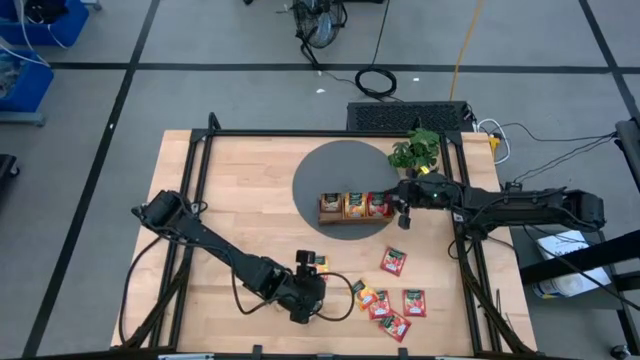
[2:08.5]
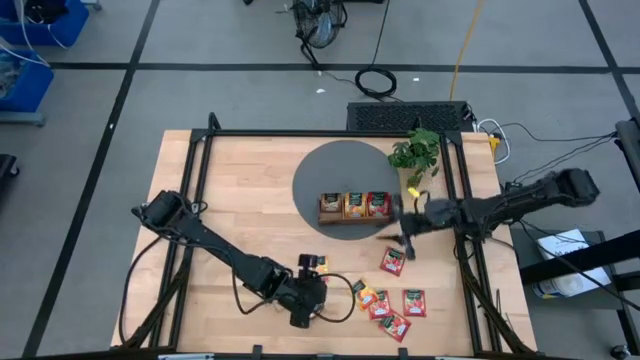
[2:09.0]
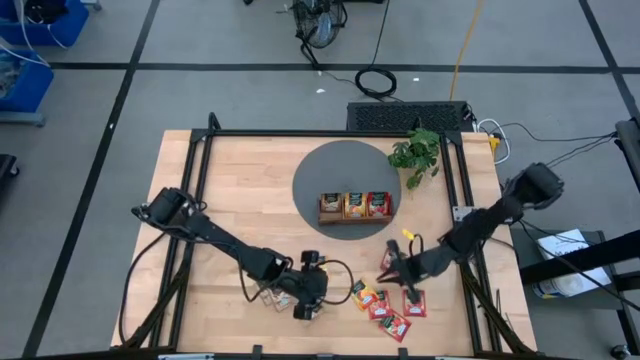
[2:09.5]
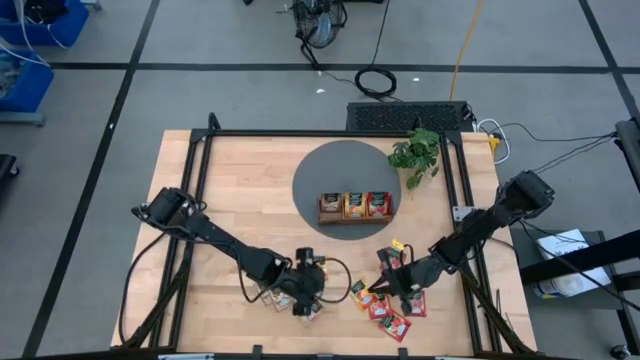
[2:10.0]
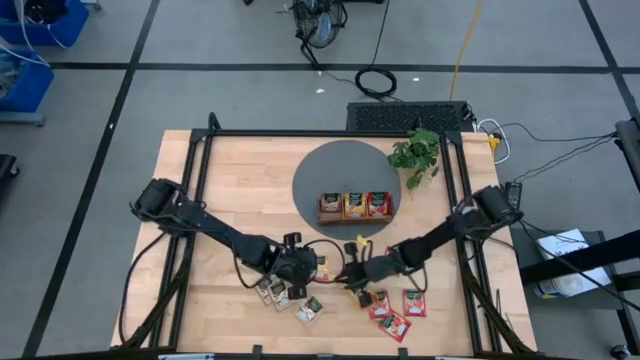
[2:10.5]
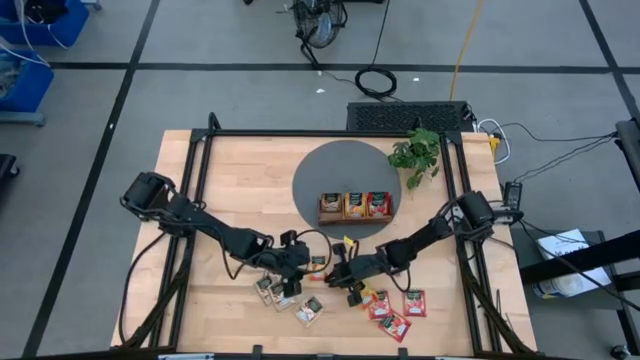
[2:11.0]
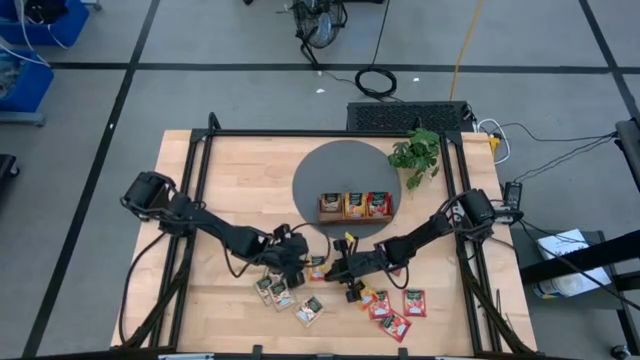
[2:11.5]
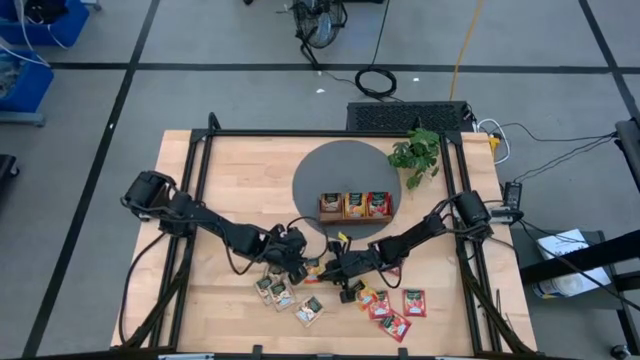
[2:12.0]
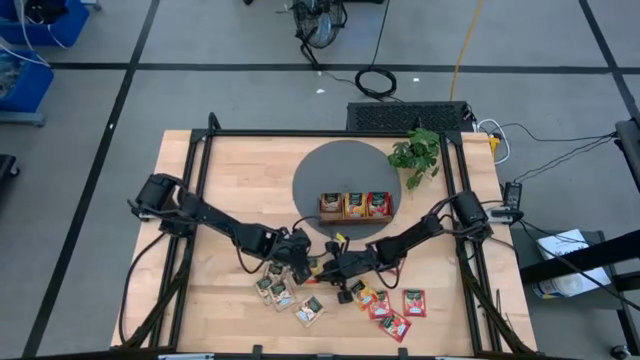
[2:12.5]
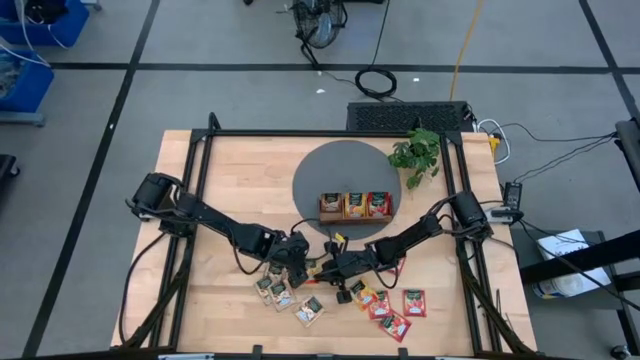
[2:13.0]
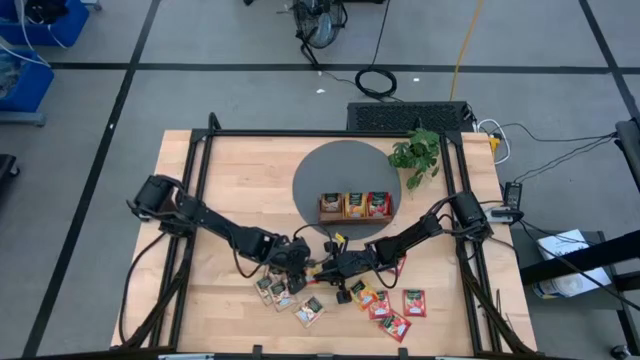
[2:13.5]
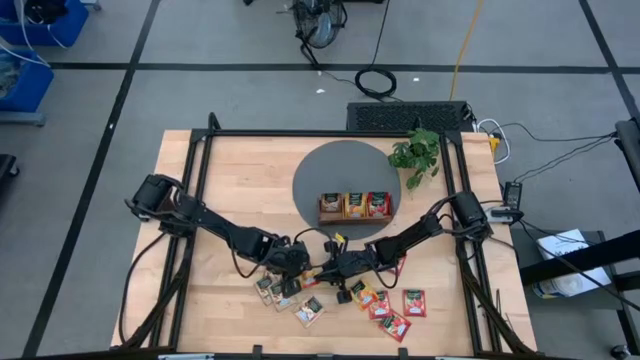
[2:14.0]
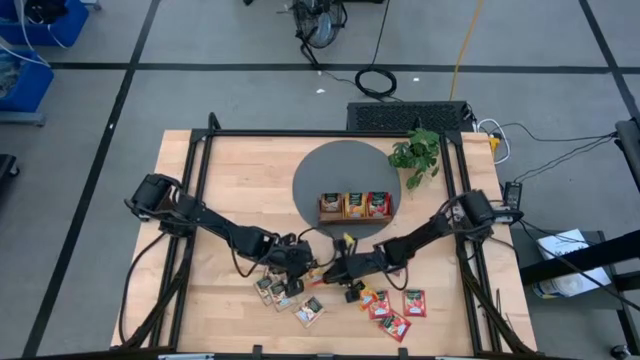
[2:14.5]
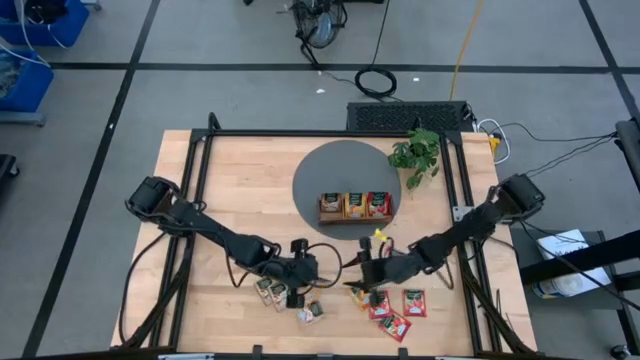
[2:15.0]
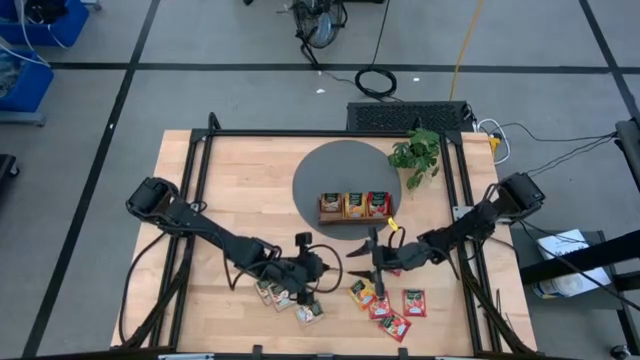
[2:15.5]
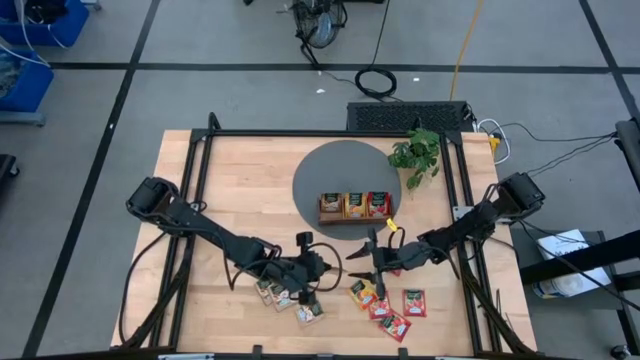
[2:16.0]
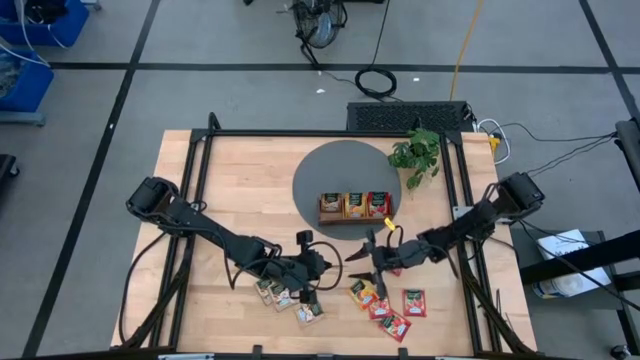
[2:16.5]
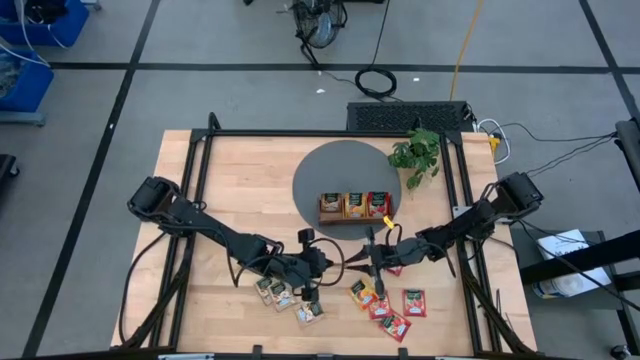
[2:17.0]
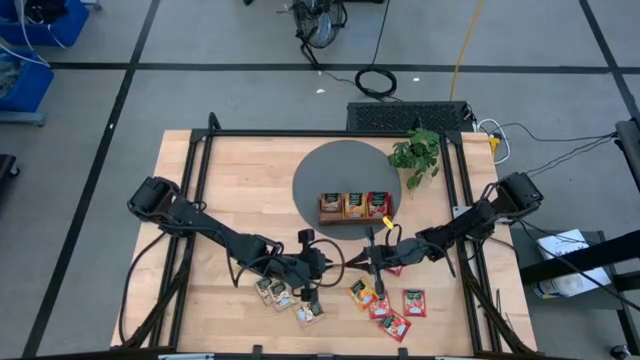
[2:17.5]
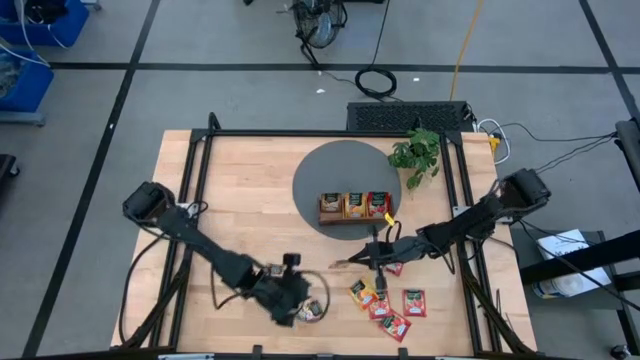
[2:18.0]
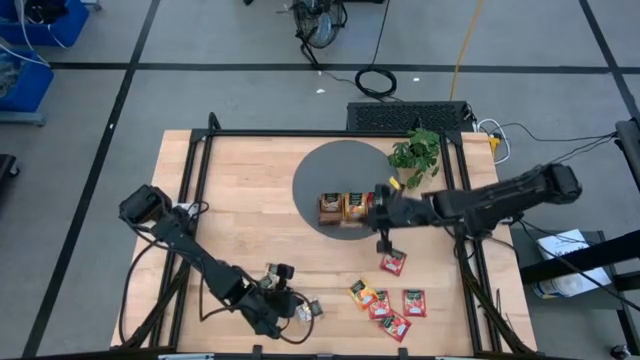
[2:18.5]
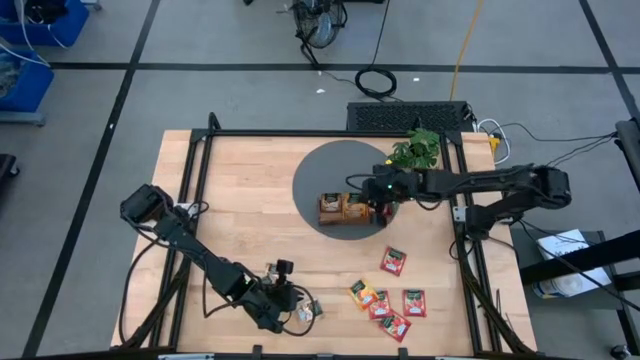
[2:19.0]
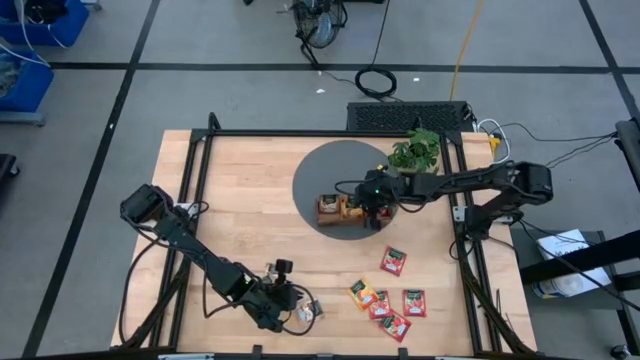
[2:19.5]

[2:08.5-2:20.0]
Task: Pick & Place Tea
Put the yellow tea bag into the middle section of the wooden organizer

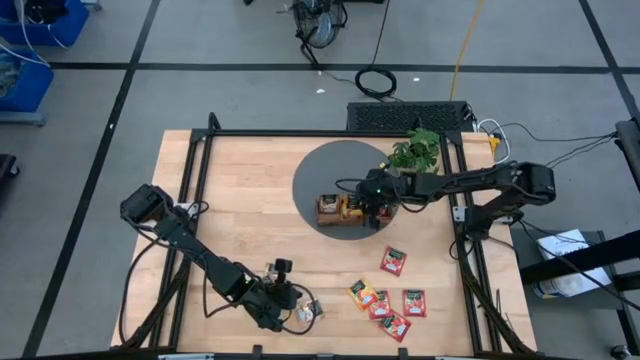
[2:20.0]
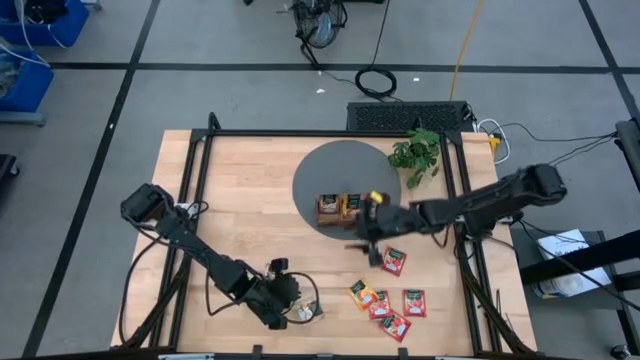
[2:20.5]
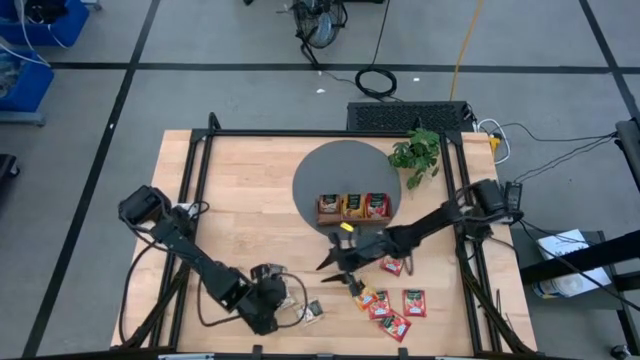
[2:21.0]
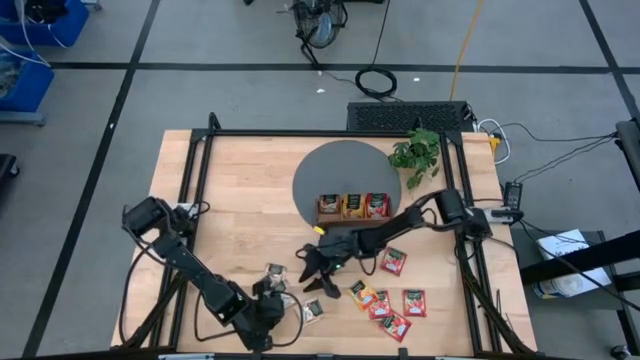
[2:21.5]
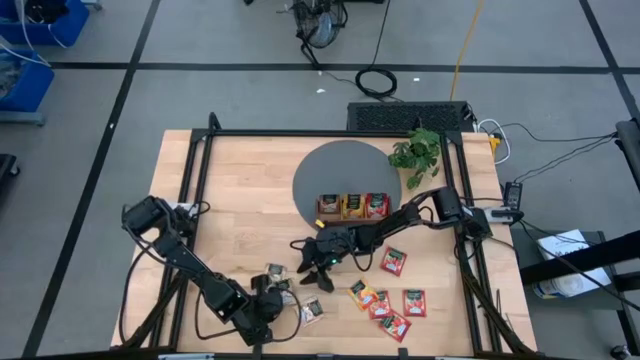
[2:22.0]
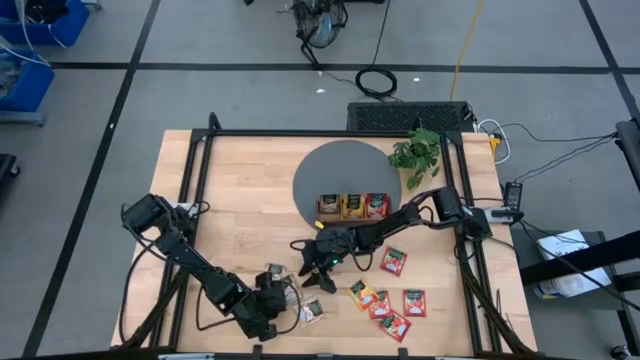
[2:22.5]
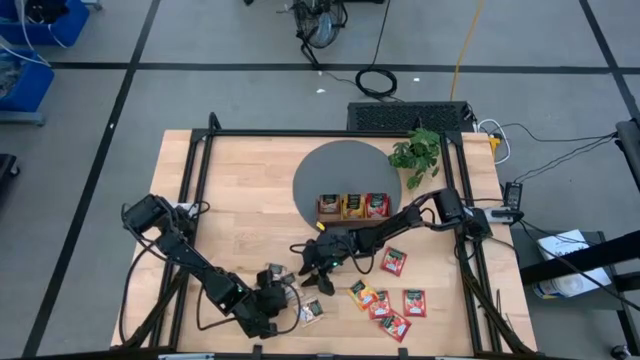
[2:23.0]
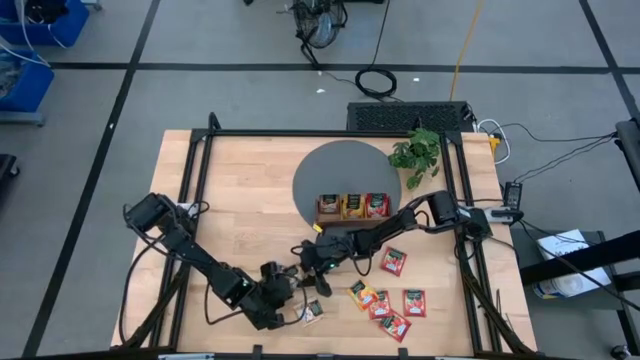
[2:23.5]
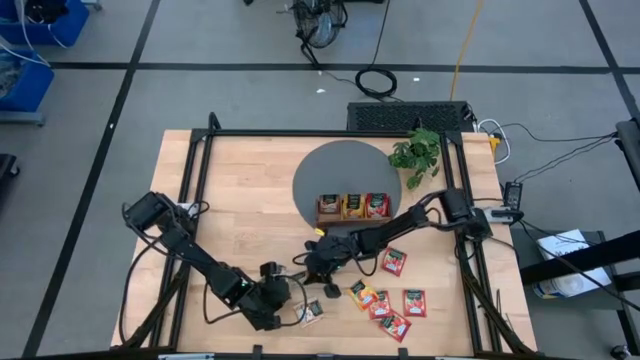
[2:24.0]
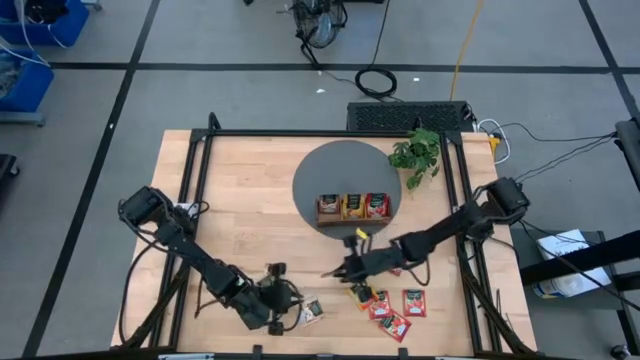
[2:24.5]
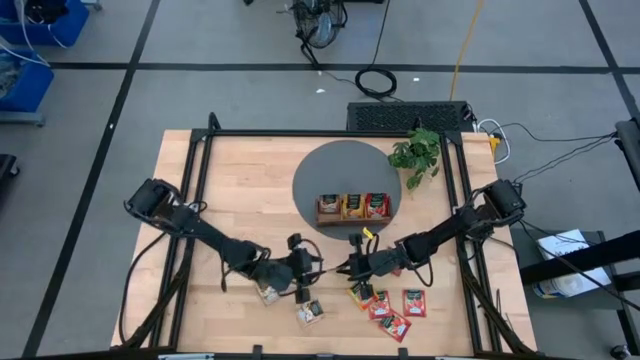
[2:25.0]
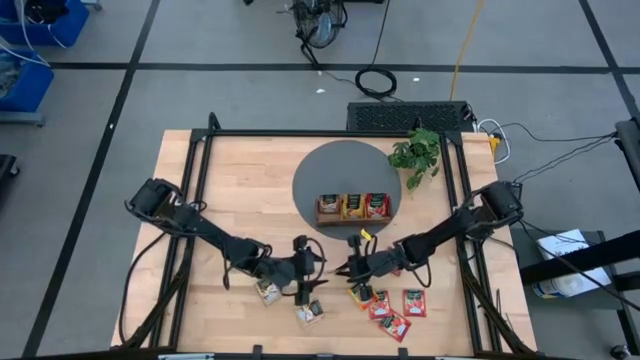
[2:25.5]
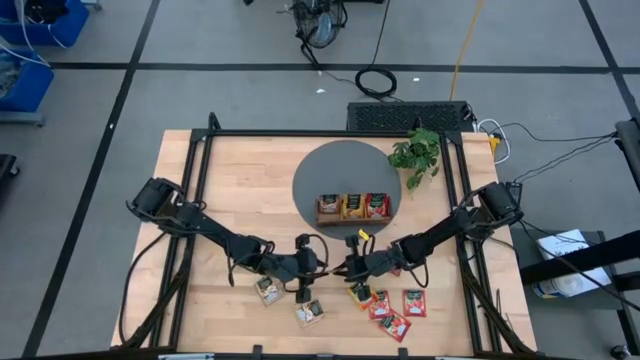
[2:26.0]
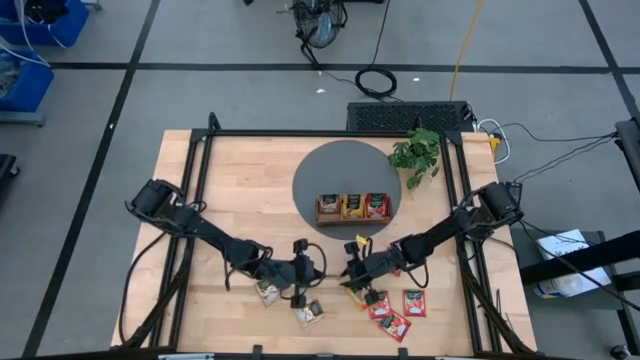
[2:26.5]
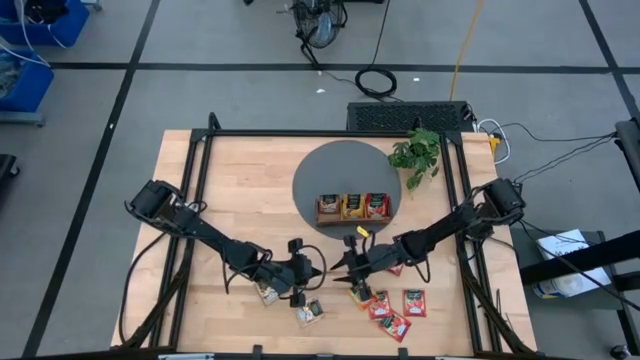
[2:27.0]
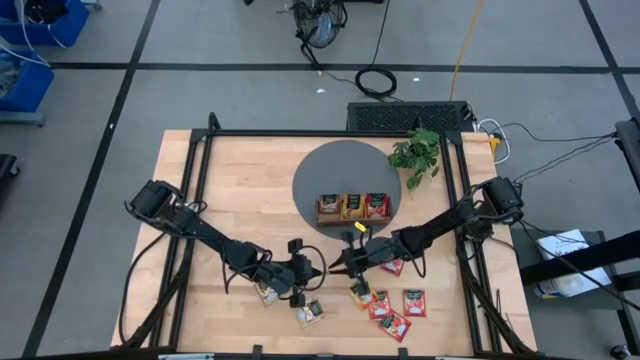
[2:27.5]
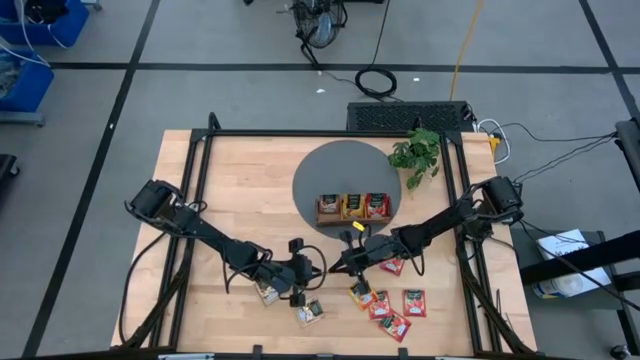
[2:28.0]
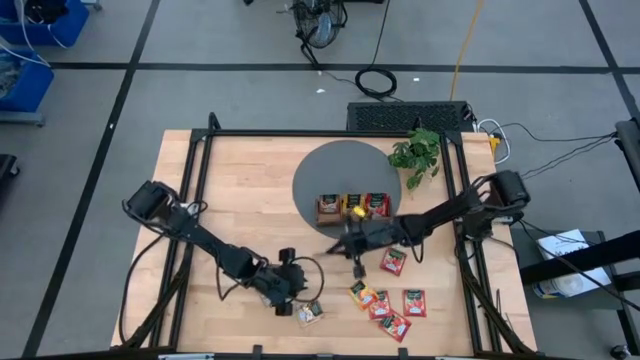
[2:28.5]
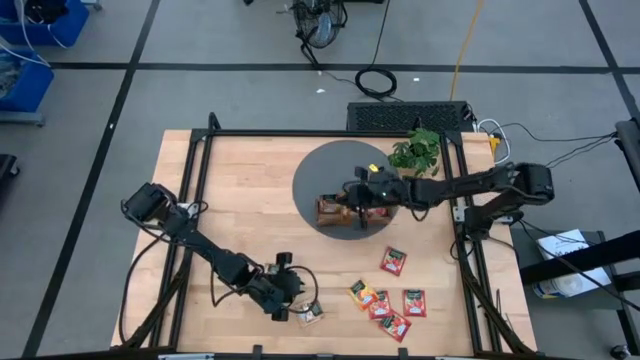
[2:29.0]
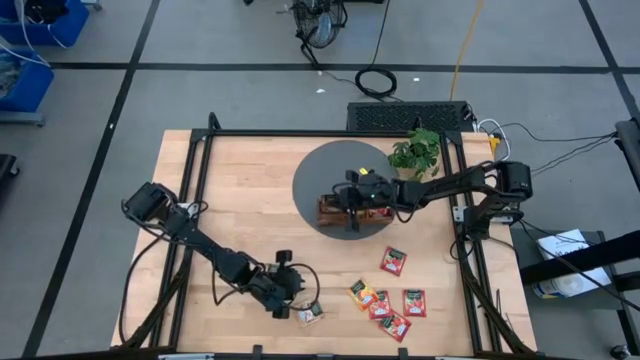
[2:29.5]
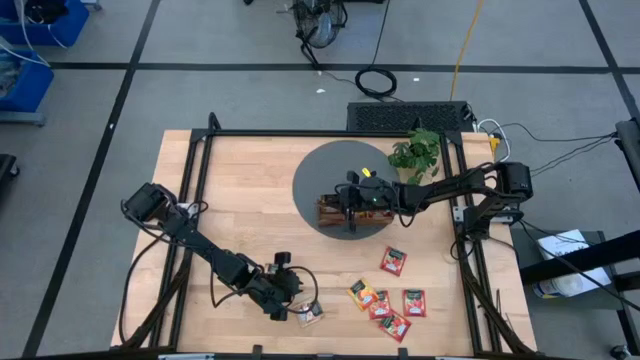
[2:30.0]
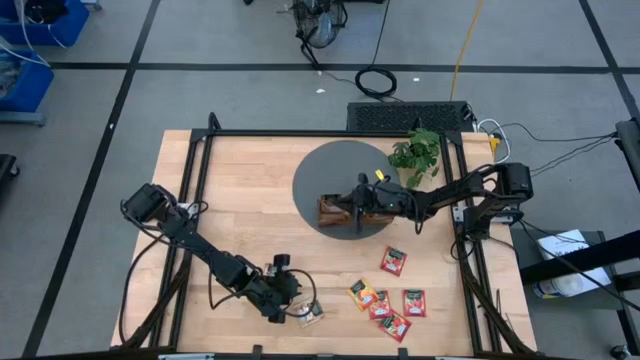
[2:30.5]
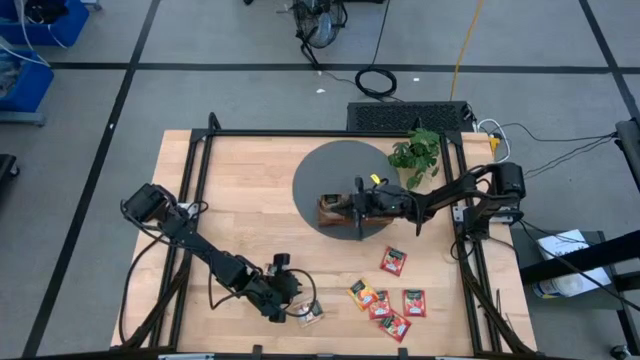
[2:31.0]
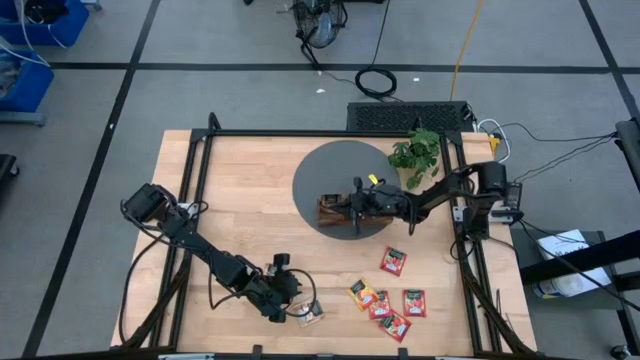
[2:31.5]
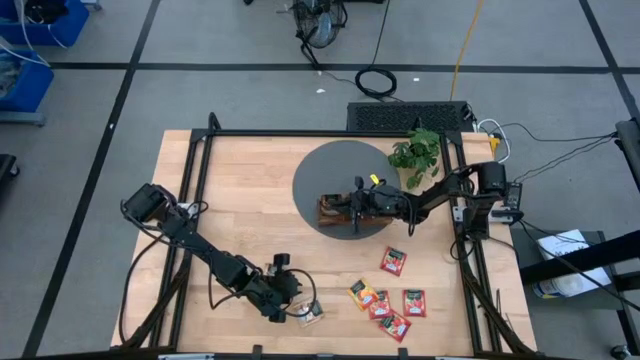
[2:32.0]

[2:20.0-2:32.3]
Put the brown tea bag into the left section of the wooden organizer
